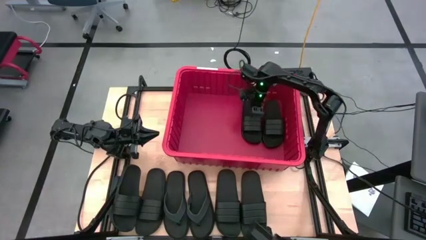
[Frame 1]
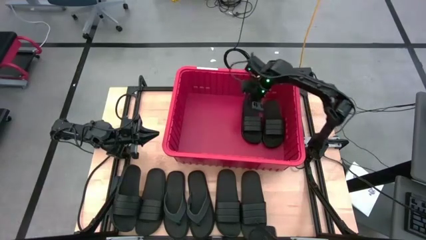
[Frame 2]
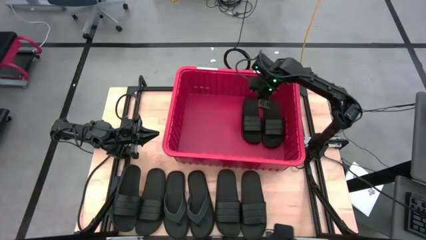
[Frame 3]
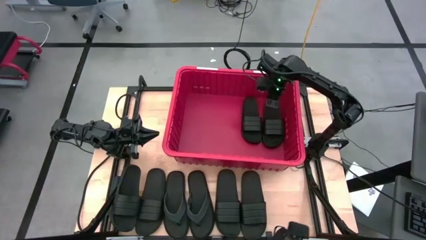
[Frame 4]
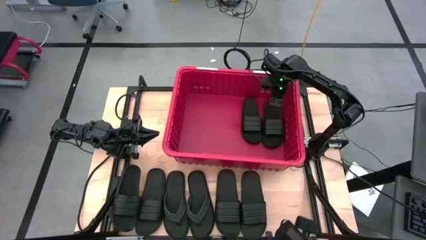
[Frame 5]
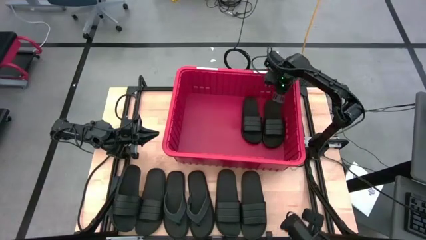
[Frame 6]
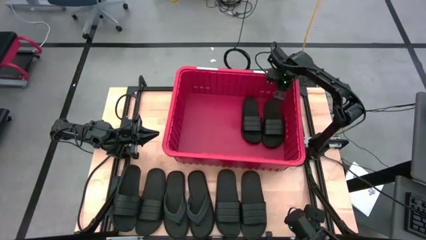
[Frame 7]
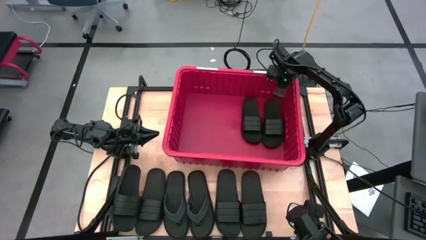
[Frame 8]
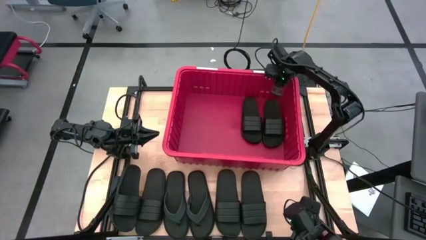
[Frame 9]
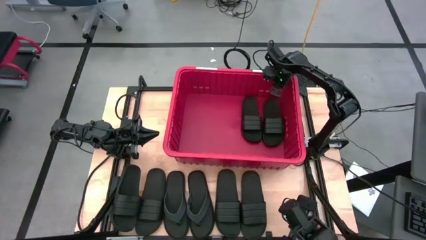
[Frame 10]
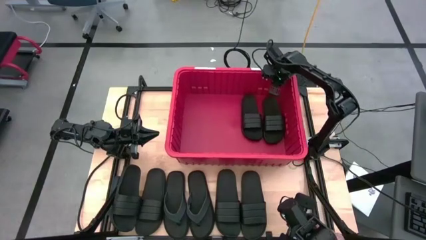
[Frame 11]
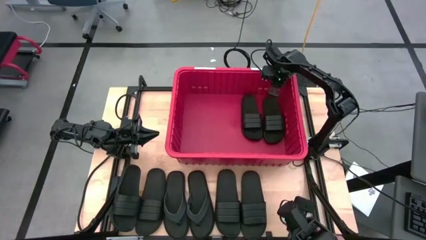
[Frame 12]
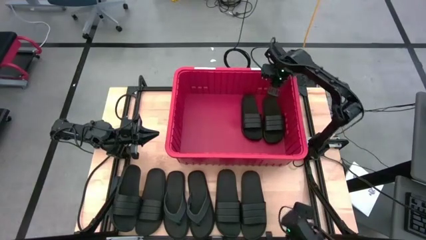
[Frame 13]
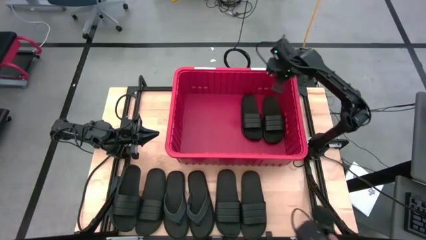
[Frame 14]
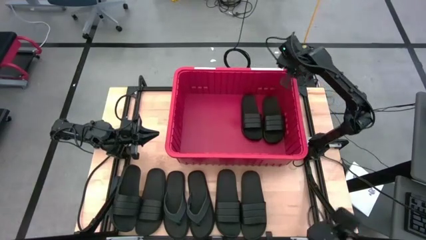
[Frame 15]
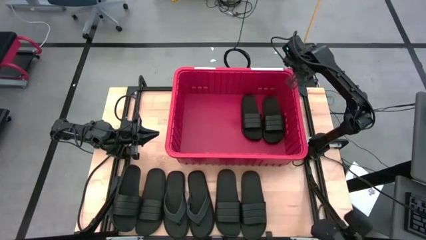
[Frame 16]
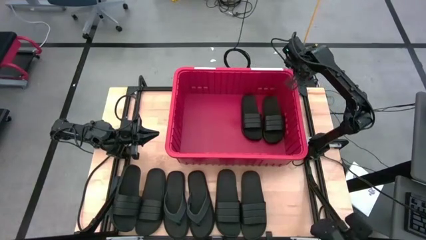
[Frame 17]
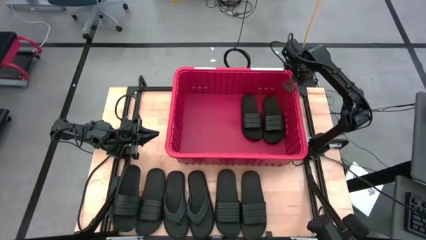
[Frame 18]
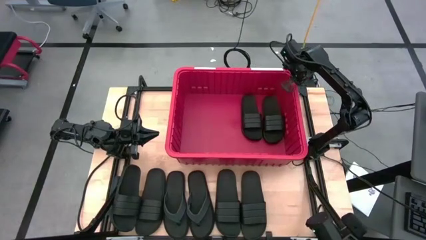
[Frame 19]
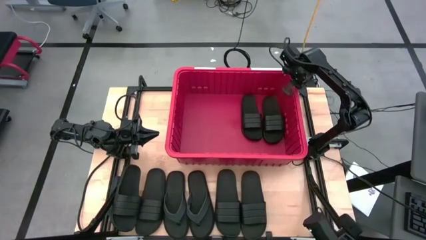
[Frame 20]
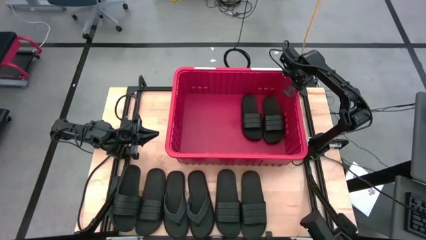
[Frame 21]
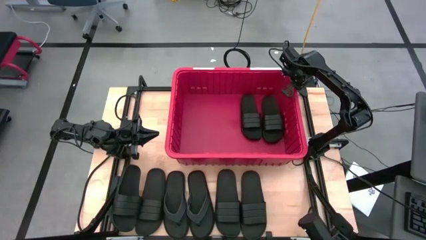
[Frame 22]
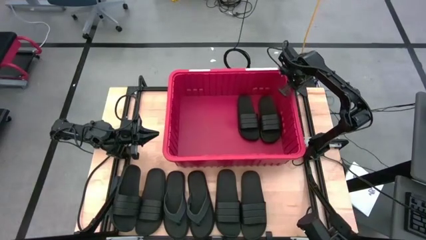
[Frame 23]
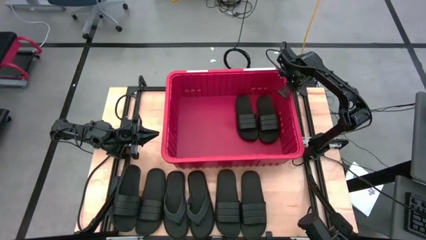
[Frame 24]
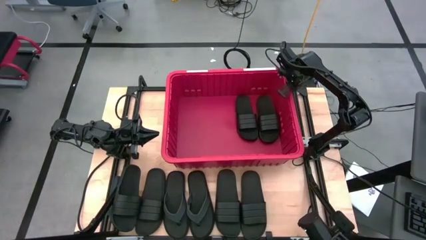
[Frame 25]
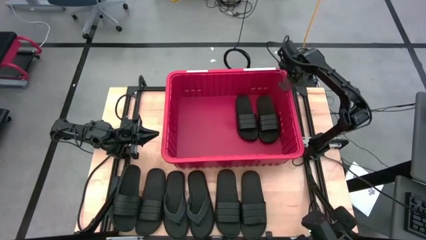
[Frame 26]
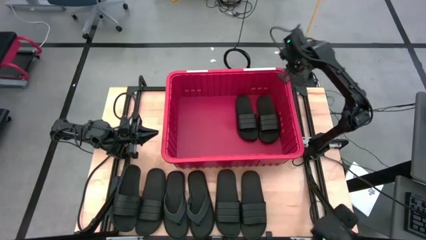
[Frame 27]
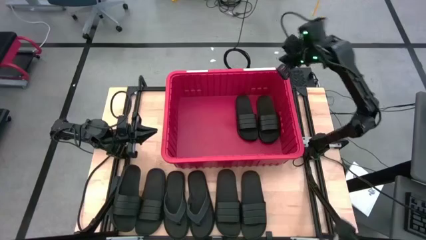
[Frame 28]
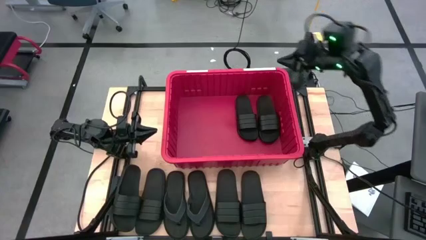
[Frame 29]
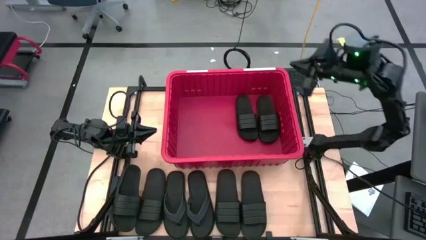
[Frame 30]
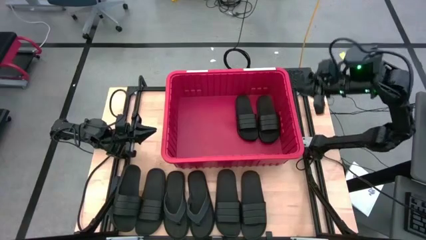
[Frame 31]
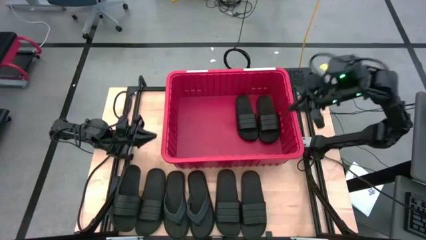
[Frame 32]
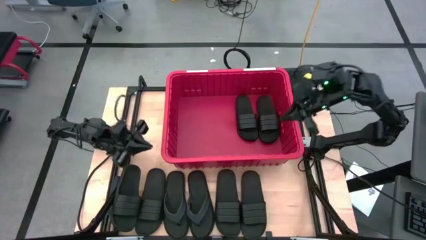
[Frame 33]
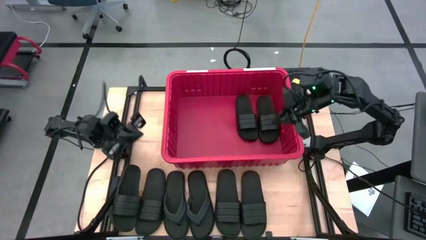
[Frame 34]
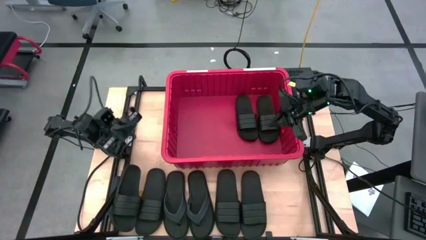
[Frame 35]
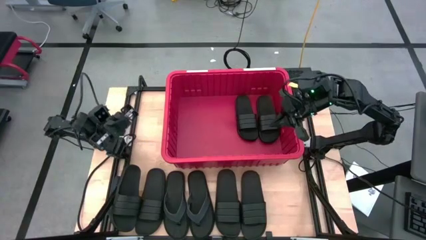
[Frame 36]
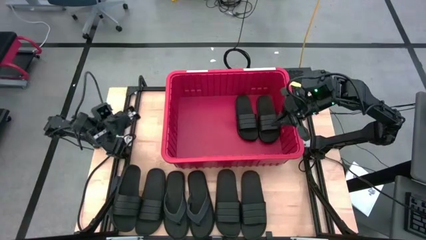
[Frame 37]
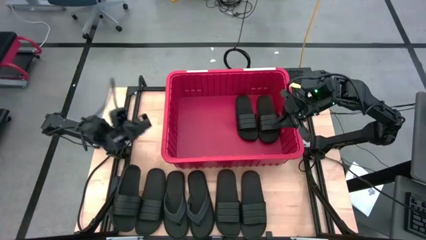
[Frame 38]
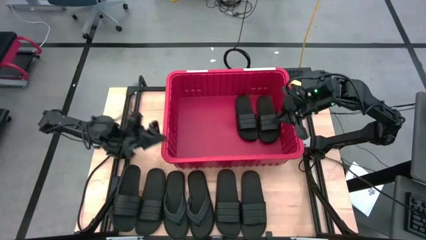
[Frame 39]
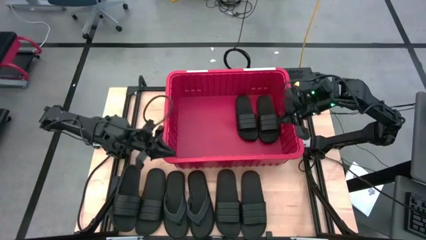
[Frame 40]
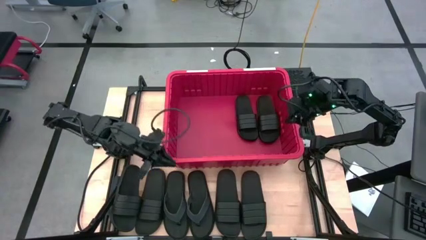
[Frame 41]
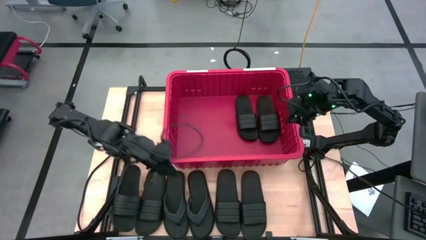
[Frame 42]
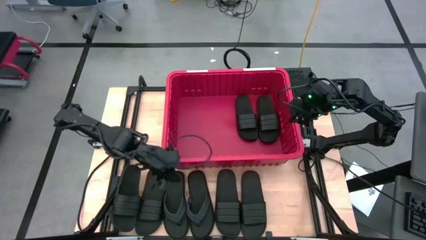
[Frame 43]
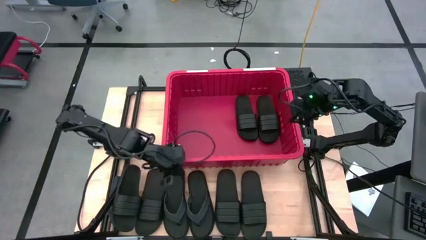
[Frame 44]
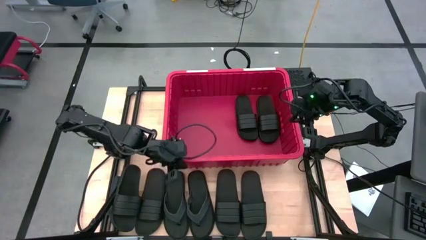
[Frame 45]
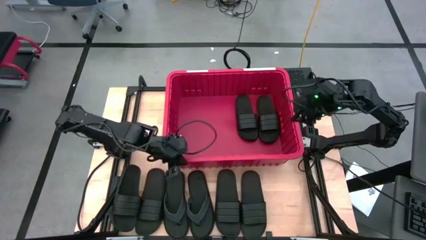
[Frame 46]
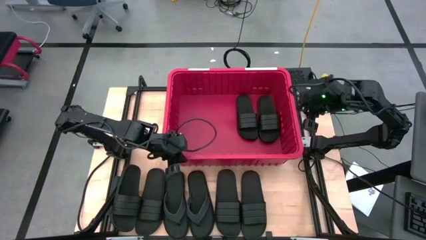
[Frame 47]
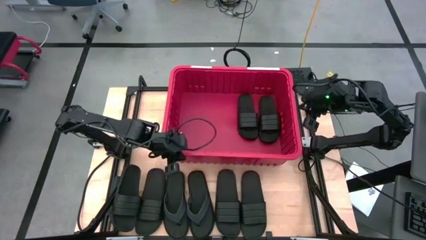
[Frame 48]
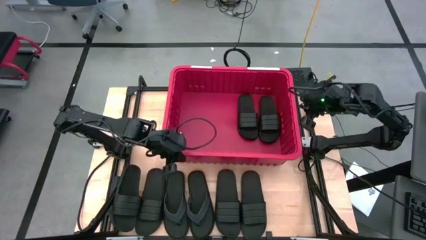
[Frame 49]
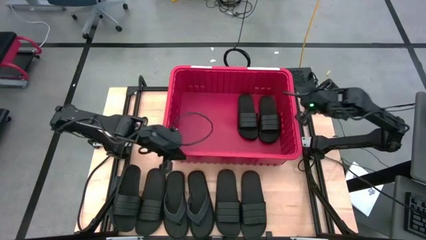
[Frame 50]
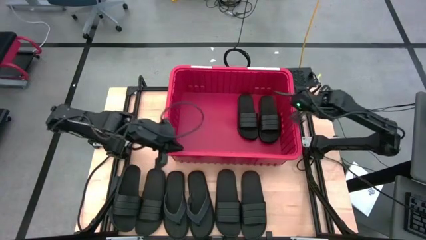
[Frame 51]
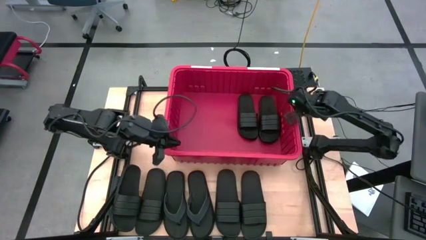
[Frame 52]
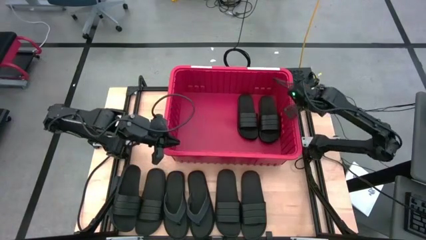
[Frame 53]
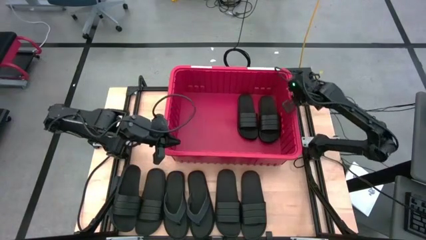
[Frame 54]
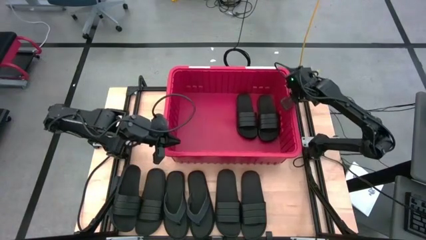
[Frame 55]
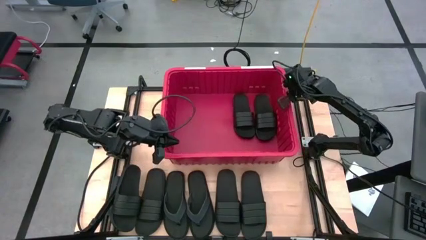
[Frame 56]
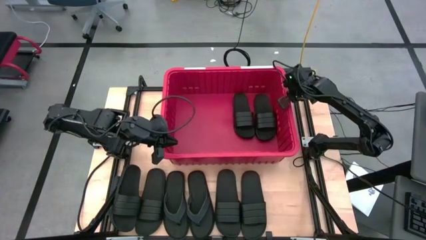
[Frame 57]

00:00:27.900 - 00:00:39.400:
Task: Pick and place slides into bin
Adjust the red bin

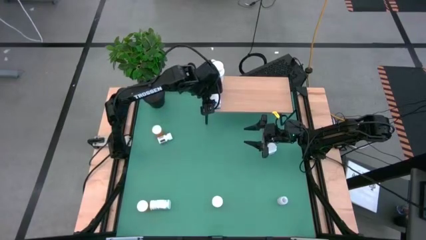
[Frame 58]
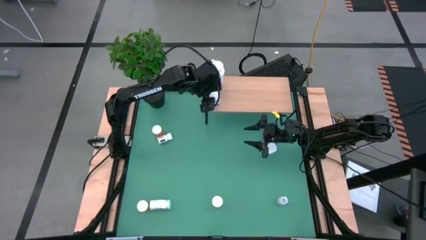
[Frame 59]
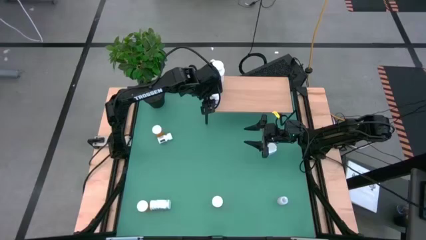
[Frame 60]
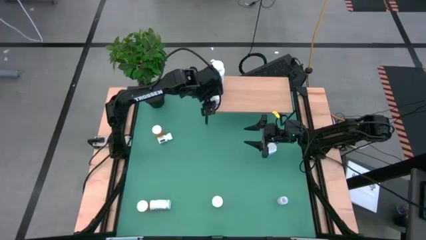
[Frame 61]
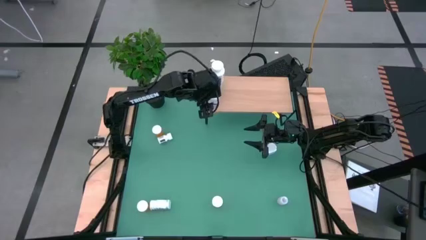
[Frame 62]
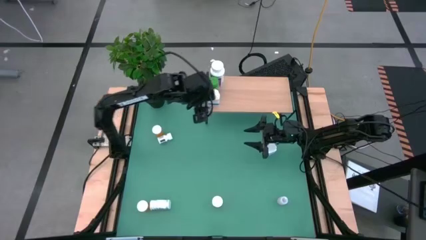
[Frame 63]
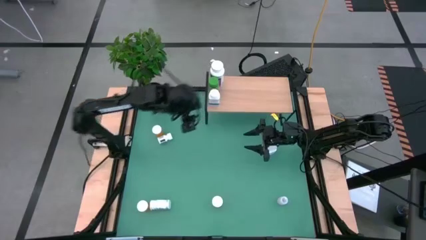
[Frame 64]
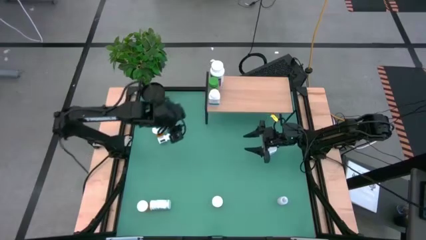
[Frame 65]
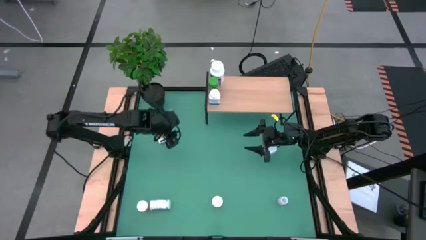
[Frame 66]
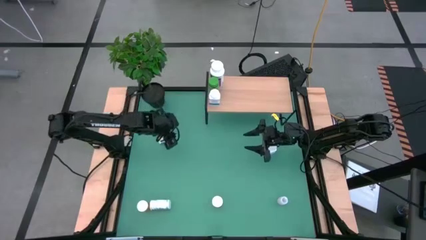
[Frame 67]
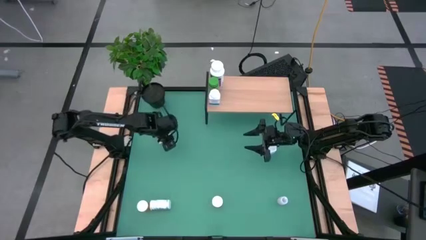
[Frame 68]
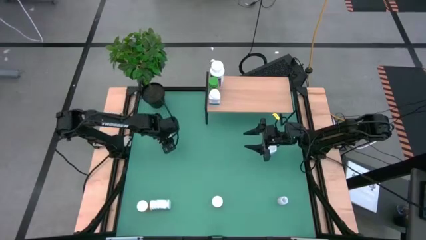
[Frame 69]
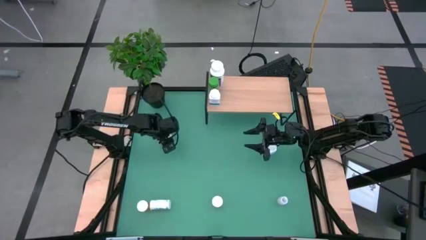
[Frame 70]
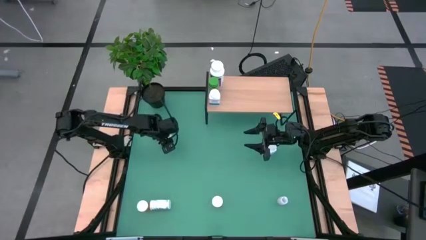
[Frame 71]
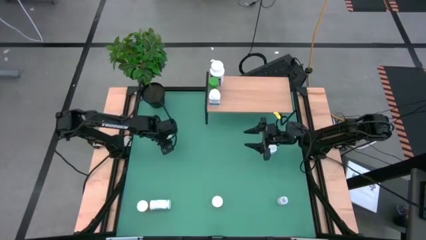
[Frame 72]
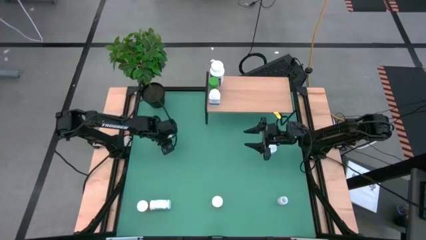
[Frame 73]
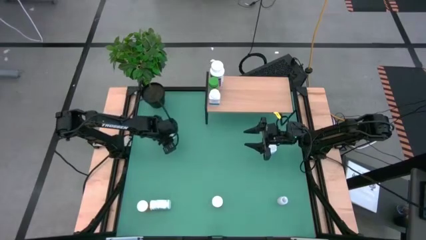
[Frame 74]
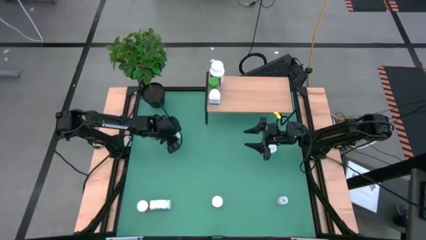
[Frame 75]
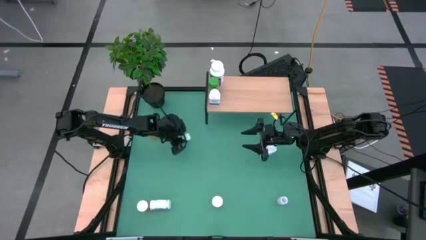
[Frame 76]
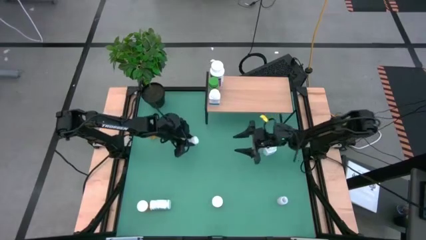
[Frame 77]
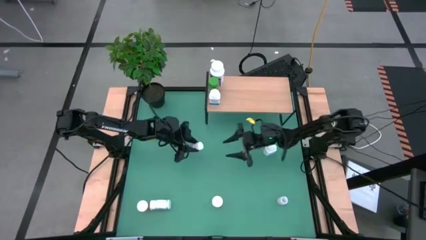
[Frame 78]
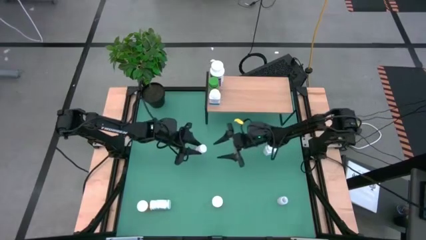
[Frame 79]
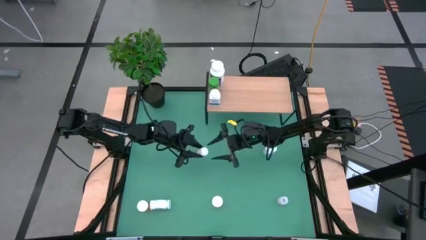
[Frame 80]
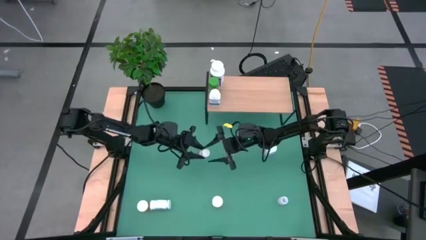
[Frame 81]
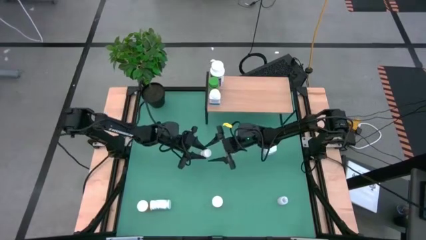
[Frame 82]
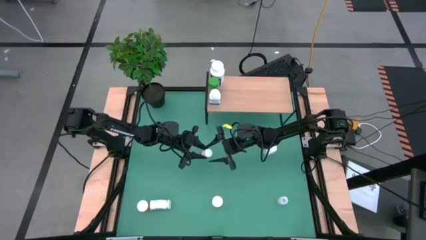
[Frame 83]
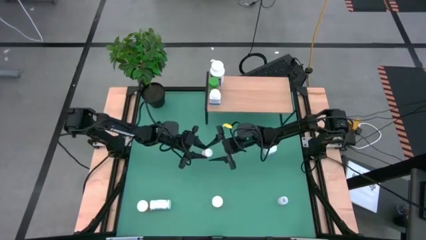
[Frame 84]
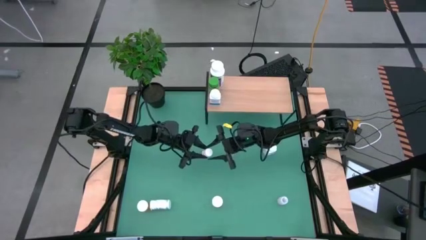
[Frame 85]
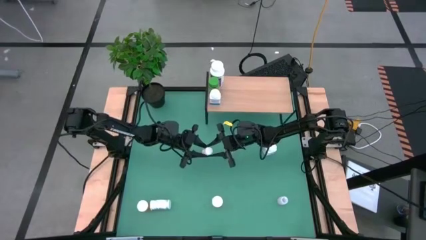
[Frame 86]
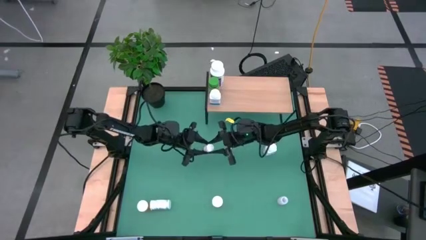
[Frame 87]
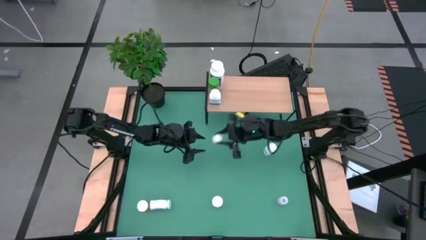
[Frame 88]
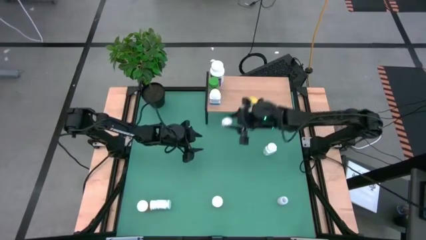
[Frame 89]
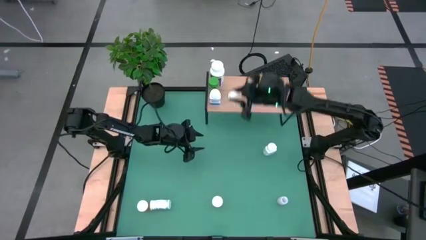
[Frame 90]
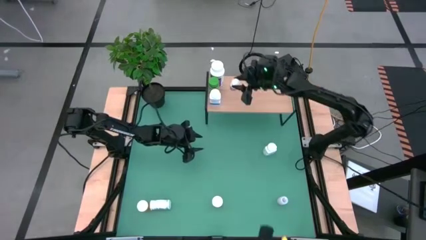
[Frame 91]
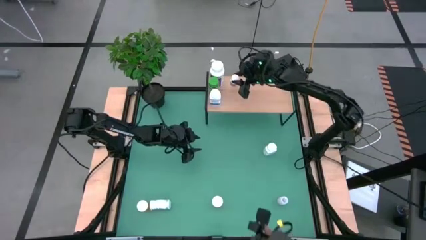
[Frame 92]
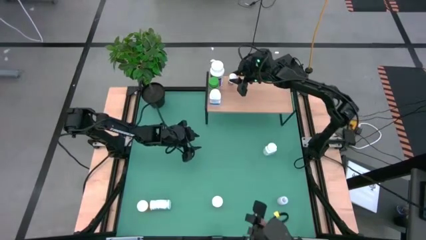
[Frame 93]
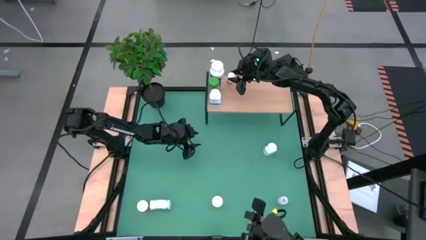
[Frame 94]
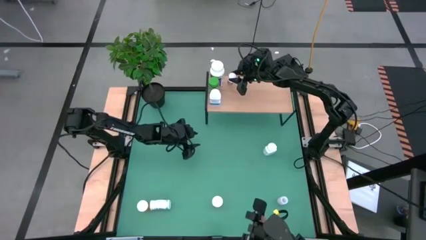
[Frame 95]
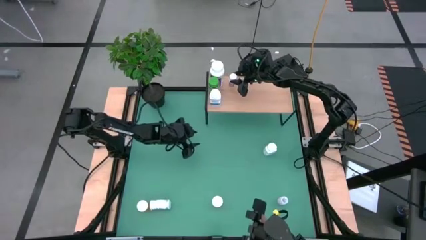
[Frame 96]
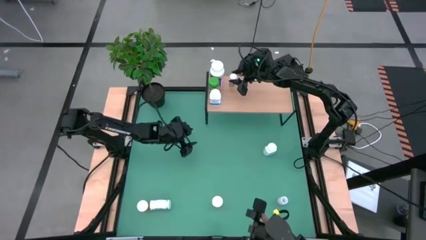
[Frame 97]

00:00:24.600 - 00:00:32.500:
Task: Pick and place medicine bottles onto shelf by color
Put the white black medicine bottle on the shelf
